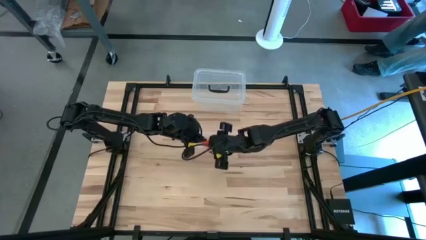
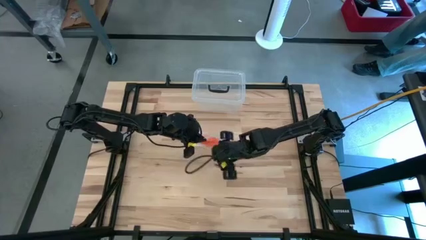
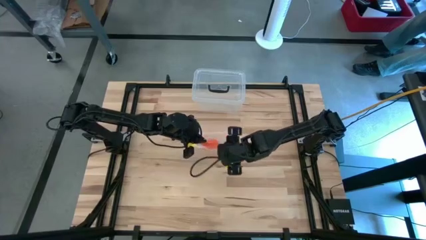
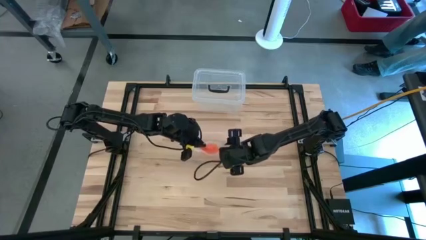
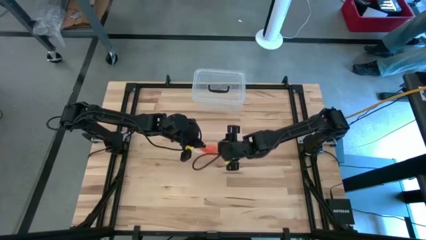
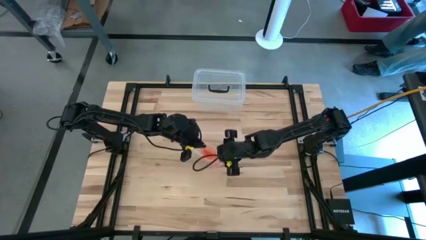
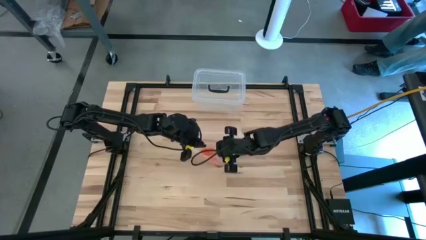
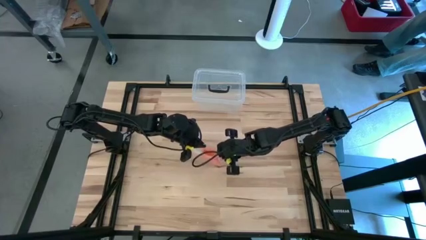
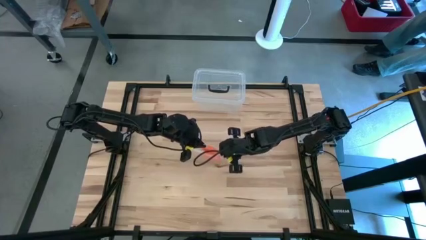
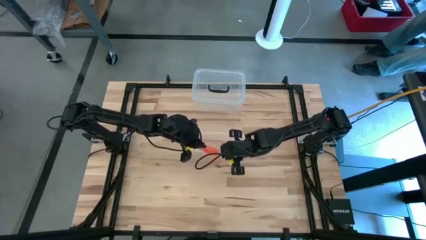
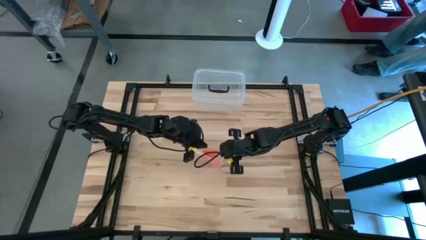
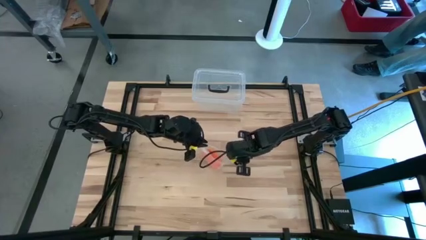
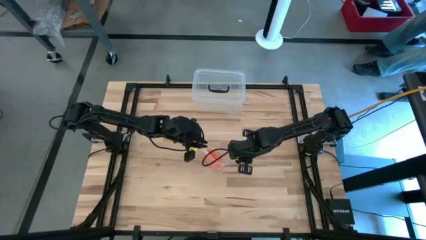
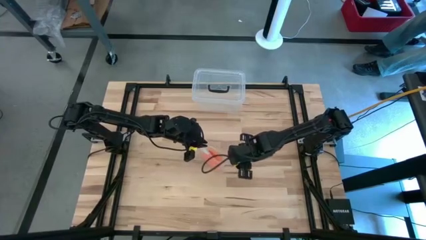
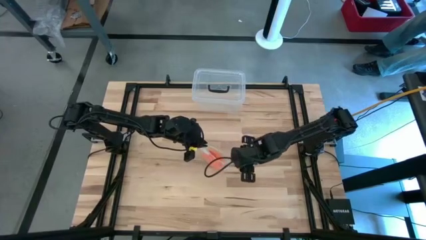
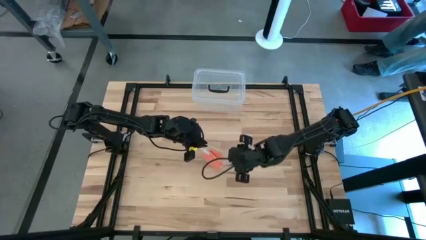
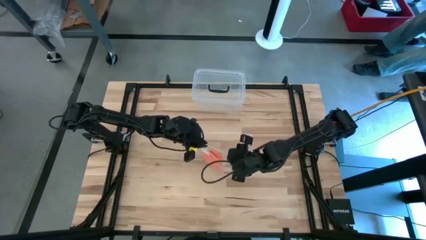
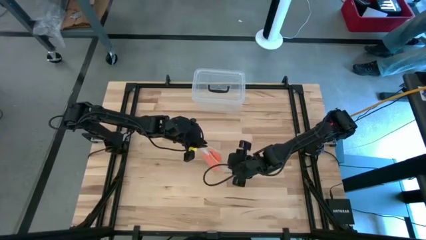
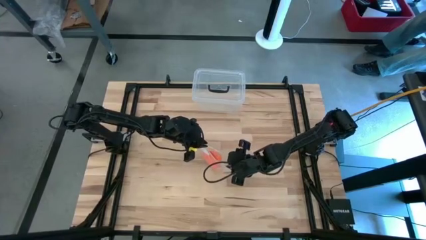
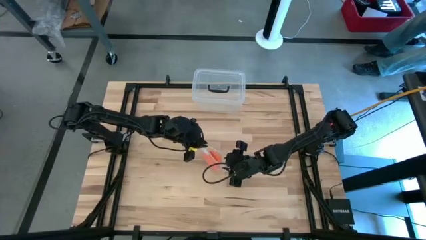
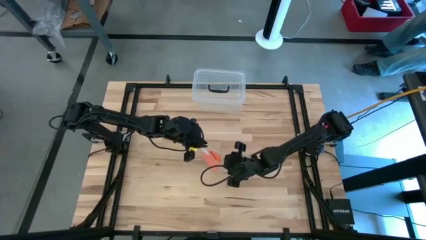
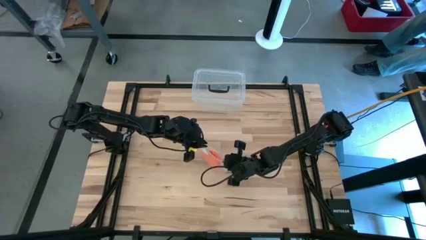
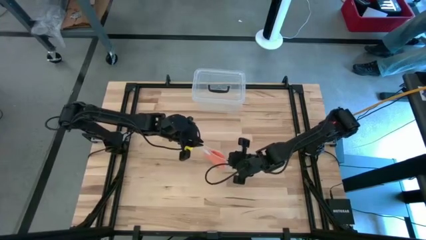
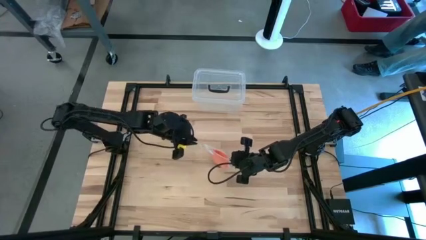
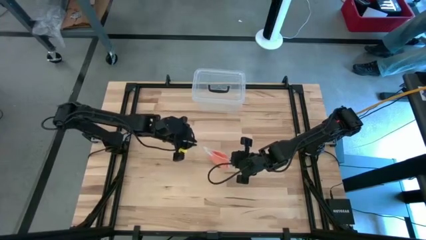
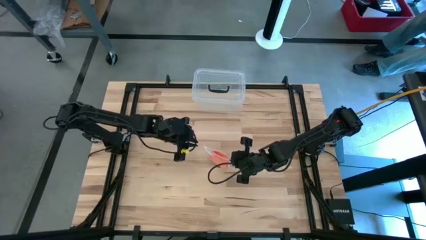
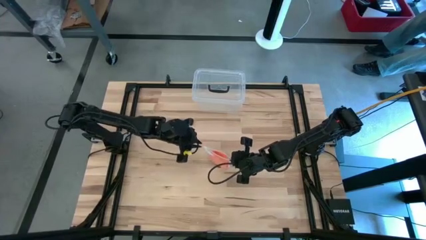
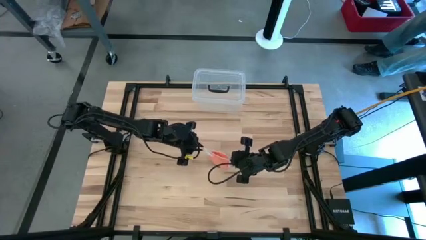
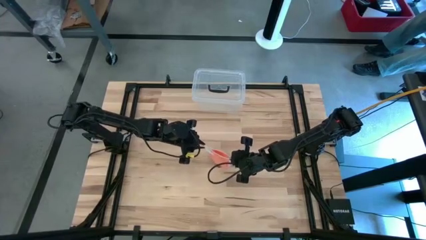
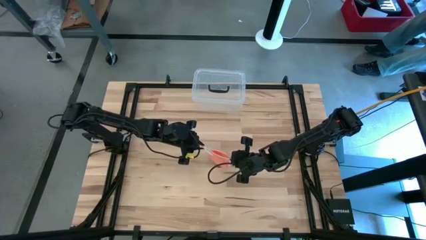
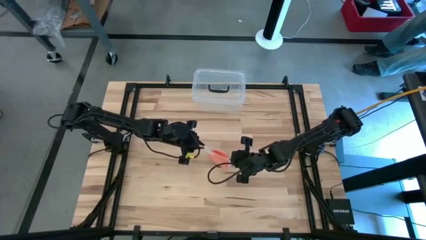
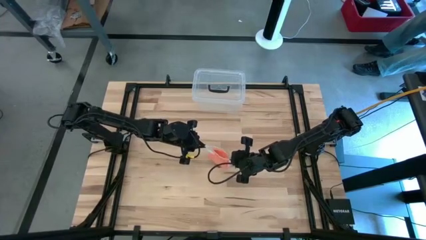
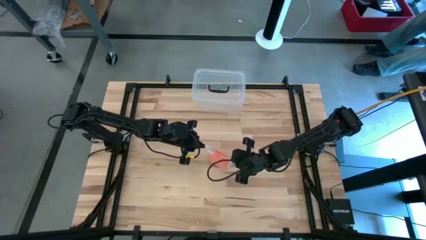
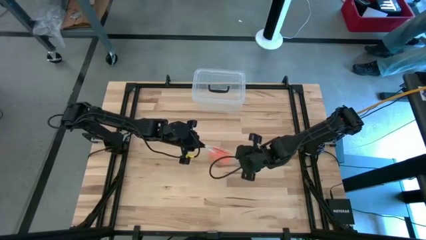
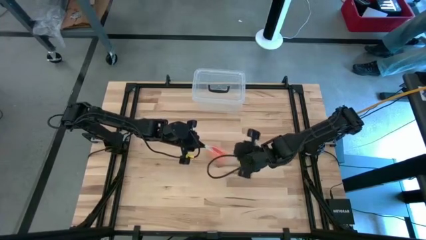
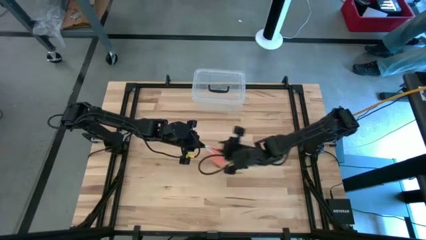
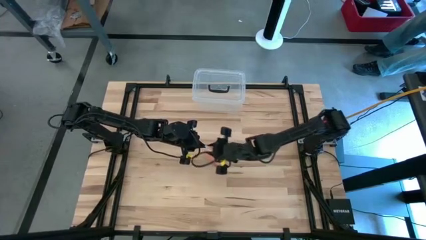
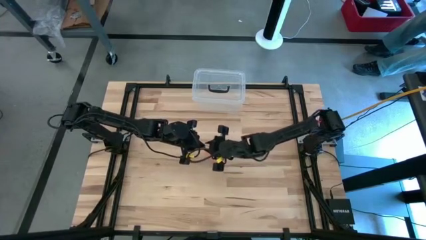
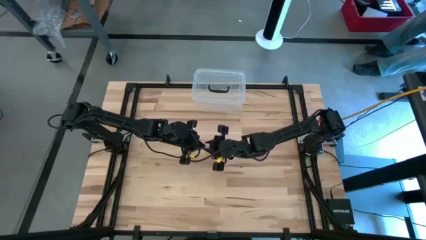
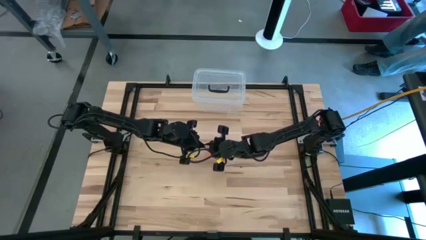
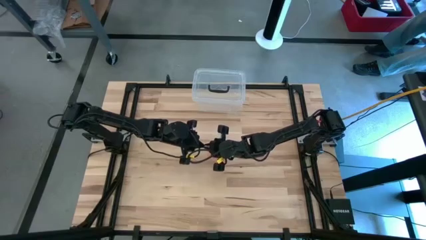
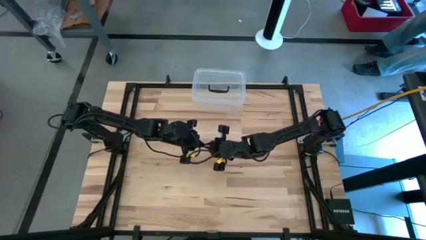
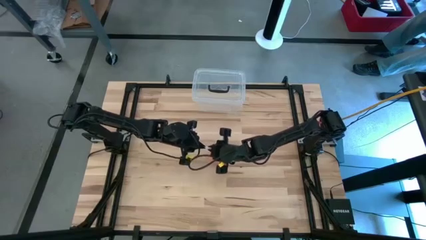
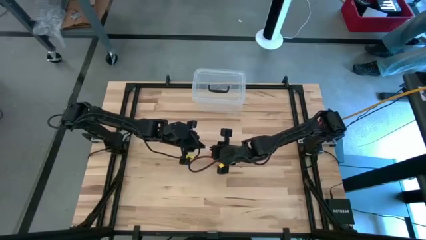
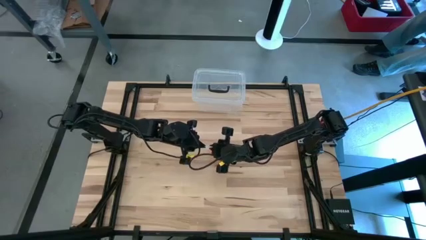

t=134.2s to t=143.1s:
Task: Roll bandage
Close the zip bag

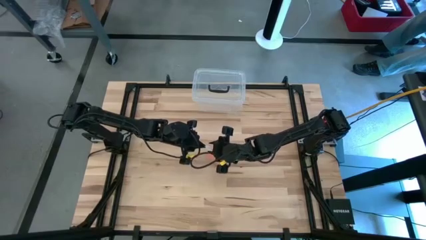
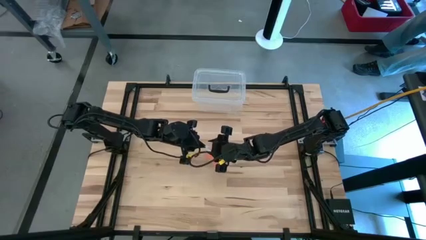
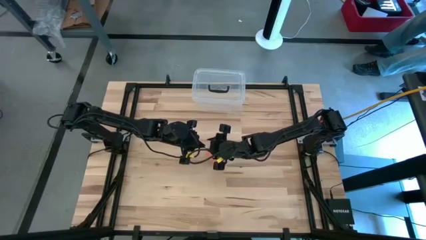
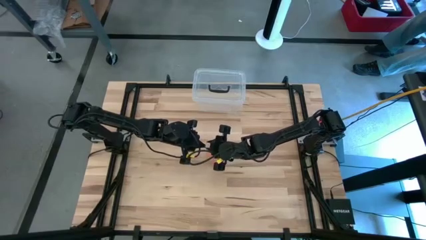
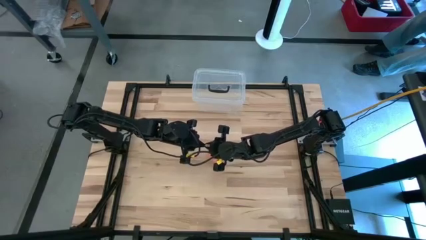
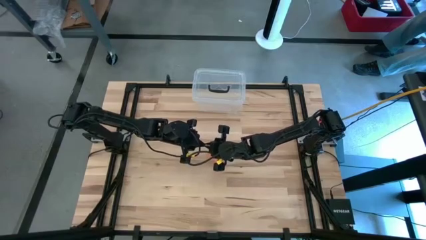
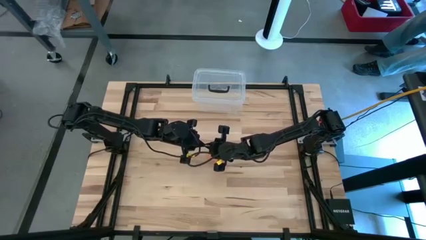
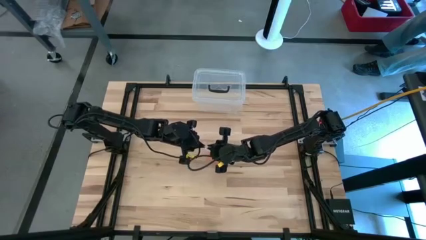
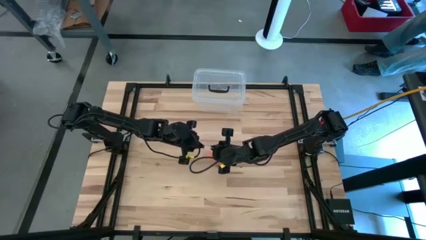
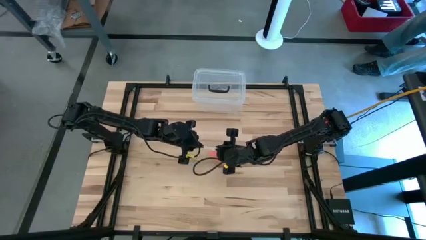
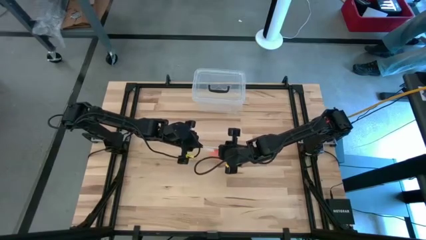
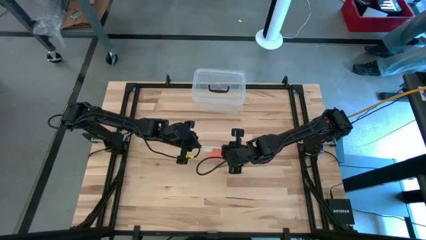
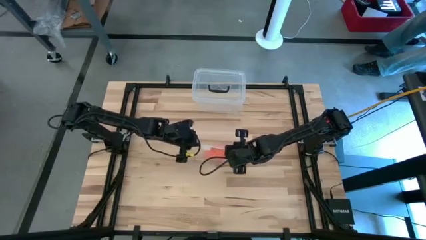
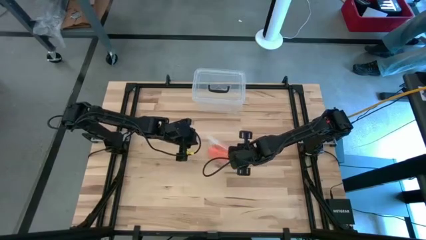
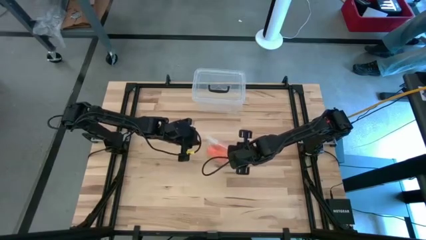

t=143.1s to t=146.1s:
Close the zip bag

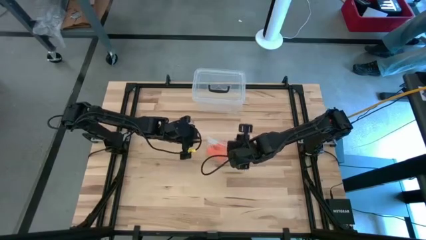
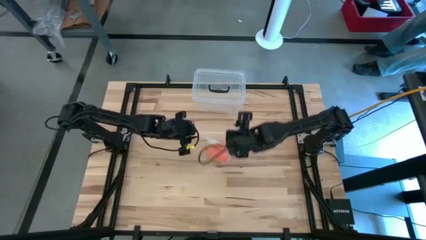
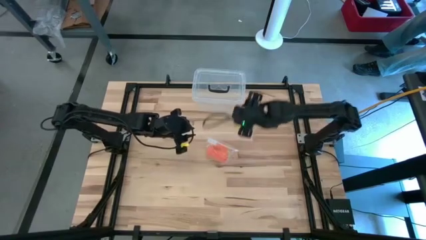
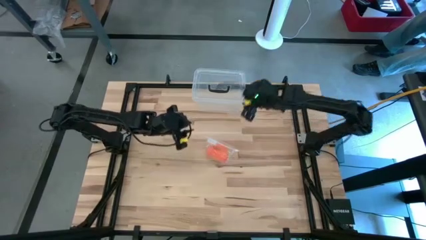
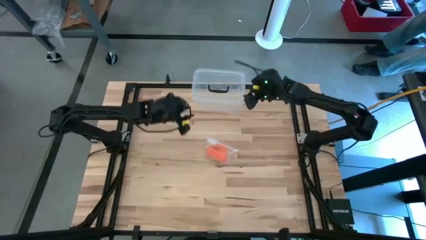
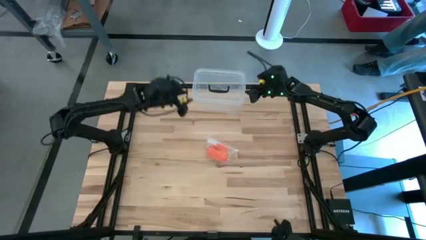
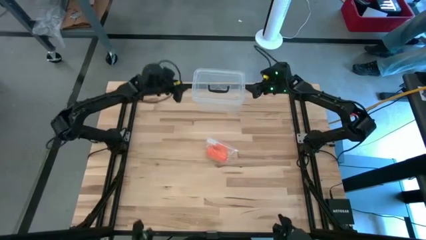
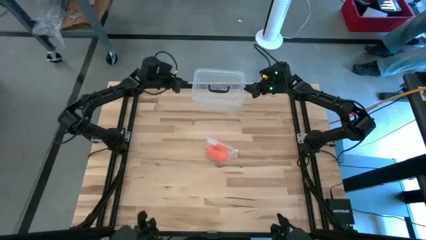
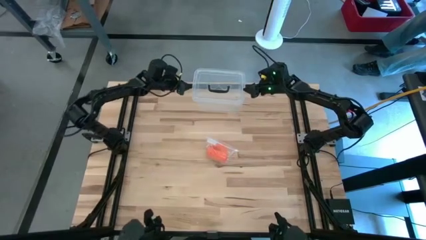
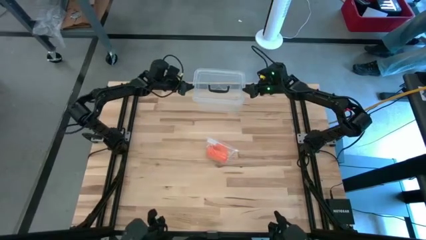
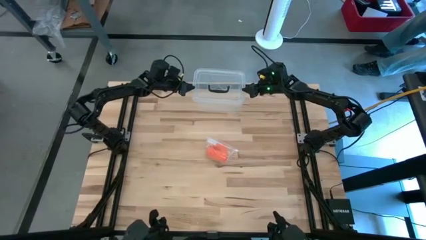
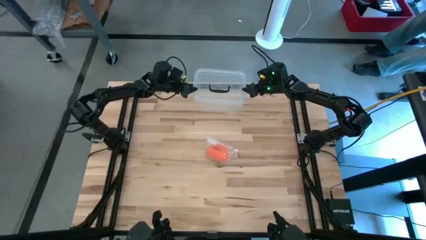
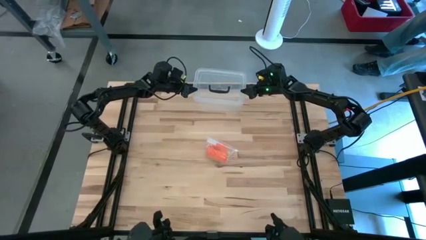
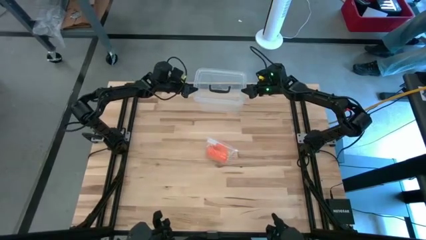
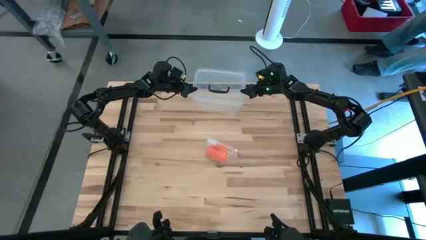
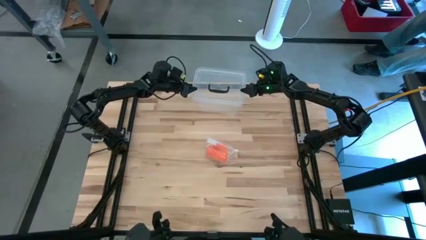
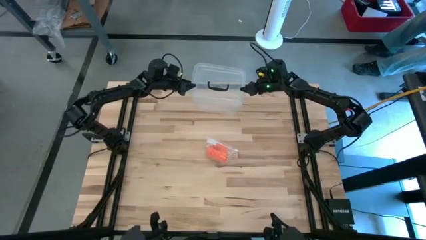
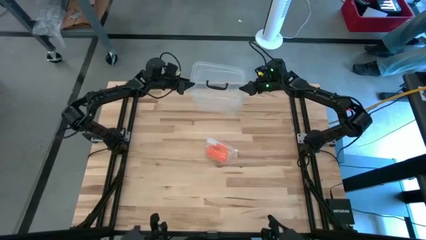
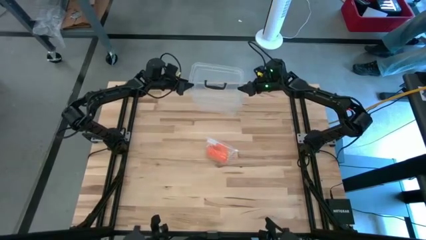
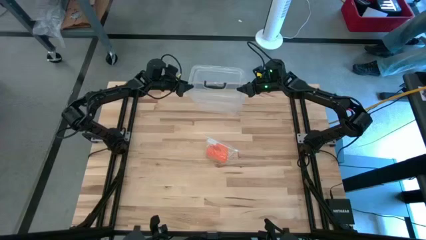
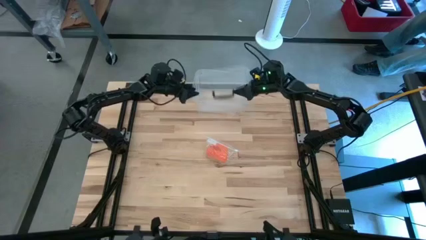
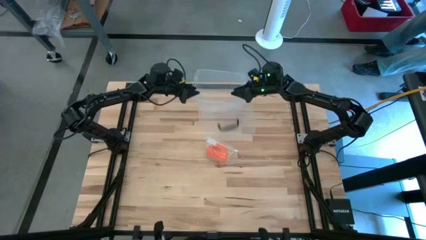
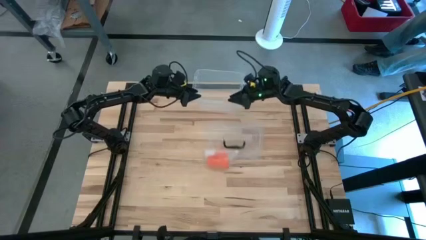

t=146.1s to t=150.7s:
Open the transparent container
